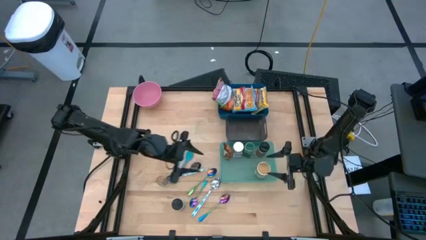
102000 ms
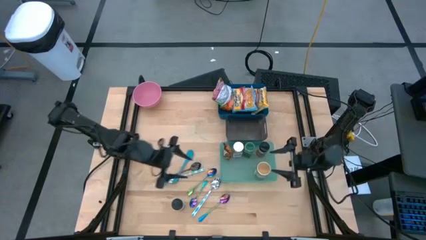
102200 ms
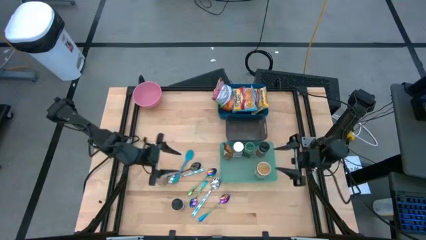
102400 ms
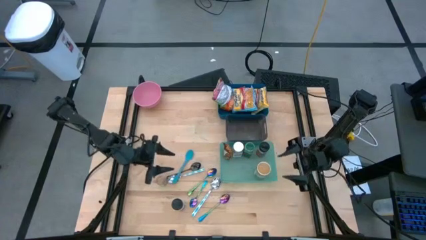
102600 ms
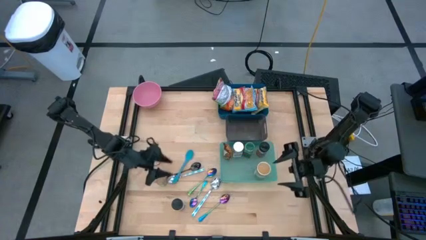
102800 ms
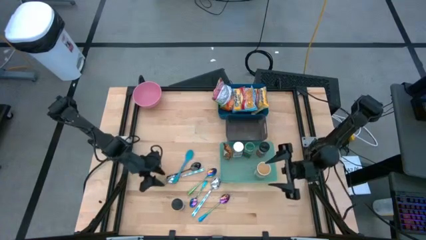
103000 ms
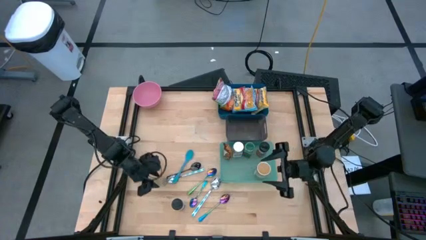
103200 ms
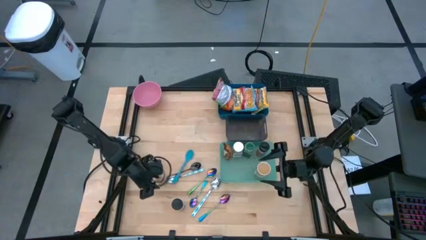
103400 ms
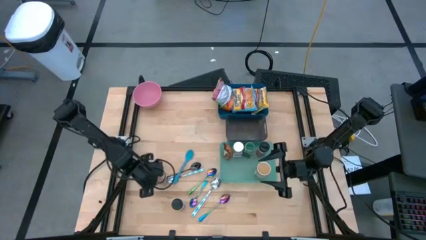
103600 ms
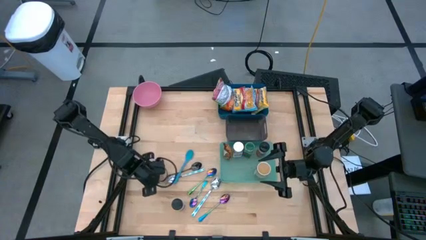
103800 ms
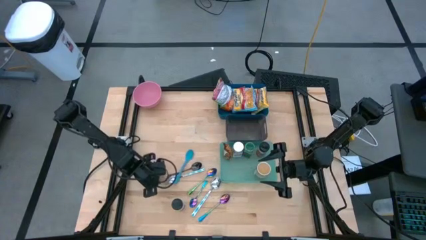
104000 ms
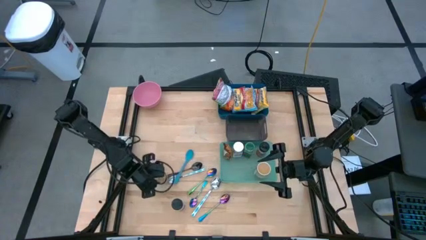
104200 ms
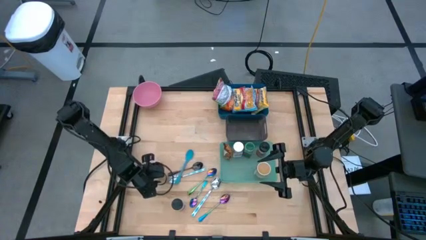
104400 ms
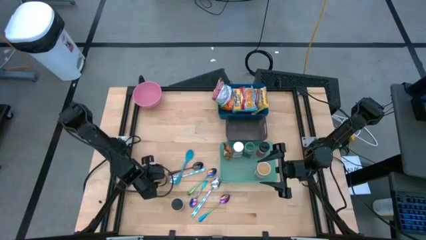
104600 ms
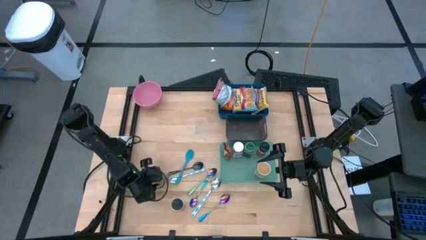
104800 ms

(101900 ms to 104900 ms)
Task: Pick & Place Food Item
Put the brown seasoning bottle into the green bin

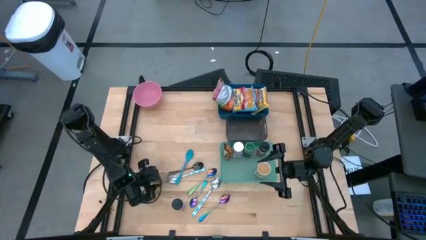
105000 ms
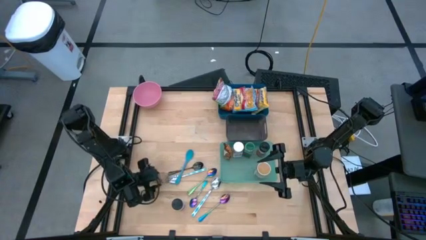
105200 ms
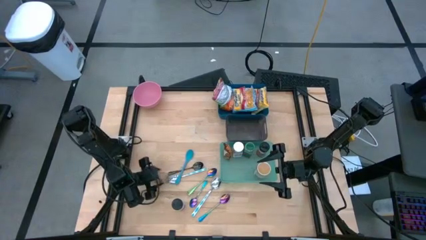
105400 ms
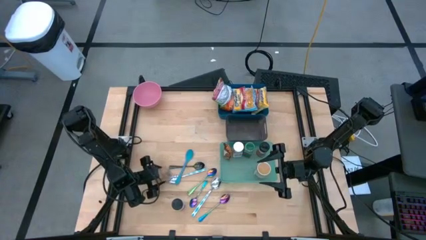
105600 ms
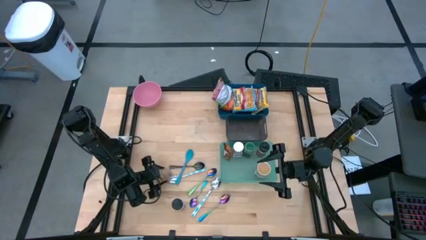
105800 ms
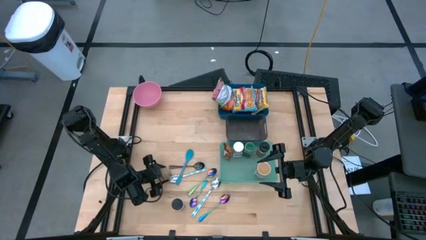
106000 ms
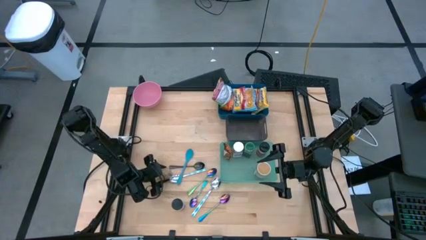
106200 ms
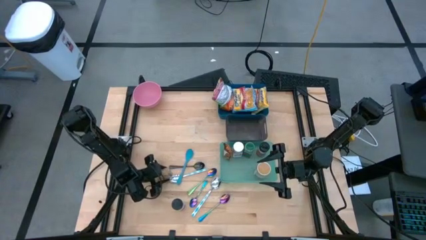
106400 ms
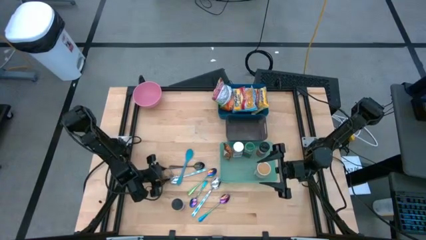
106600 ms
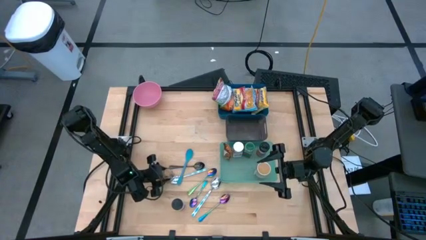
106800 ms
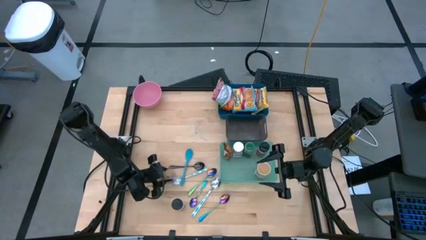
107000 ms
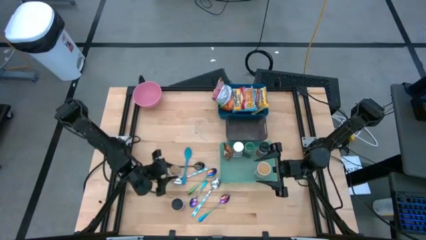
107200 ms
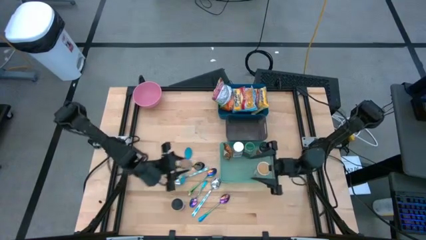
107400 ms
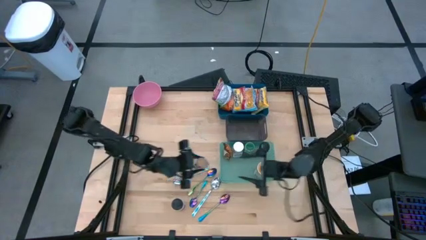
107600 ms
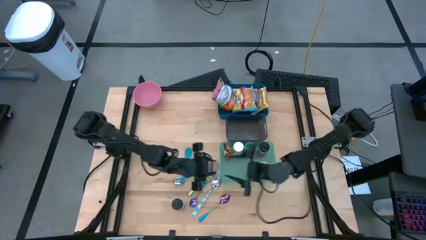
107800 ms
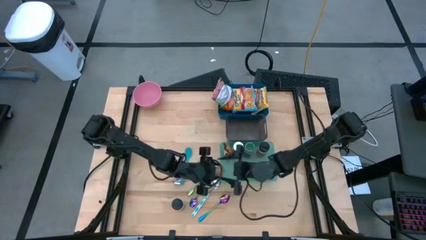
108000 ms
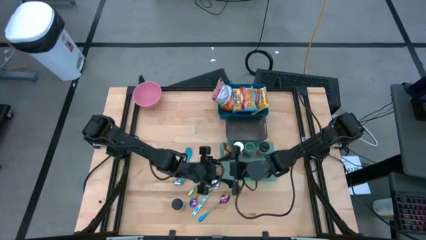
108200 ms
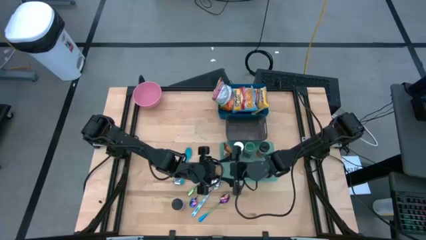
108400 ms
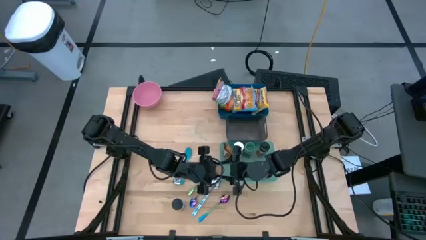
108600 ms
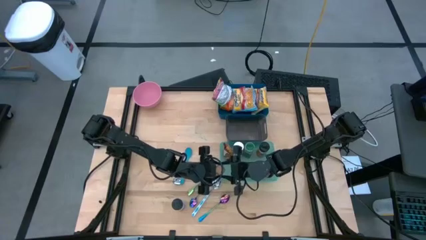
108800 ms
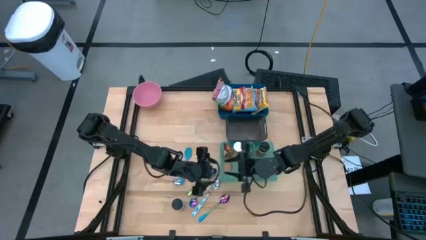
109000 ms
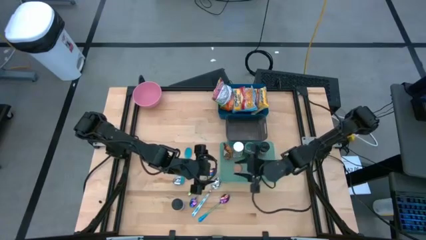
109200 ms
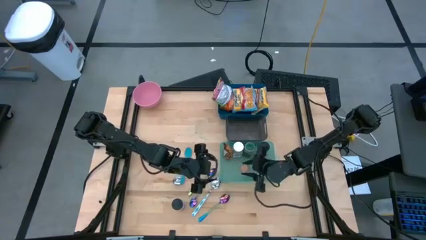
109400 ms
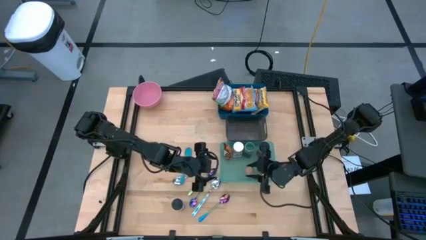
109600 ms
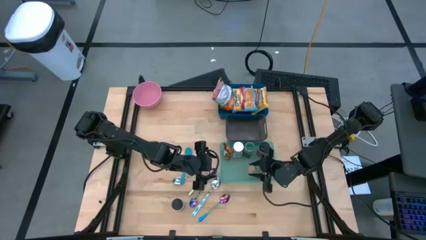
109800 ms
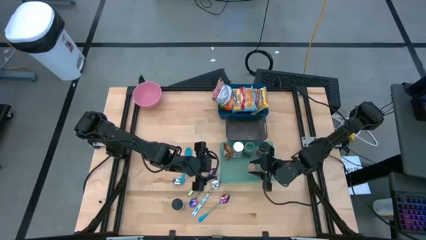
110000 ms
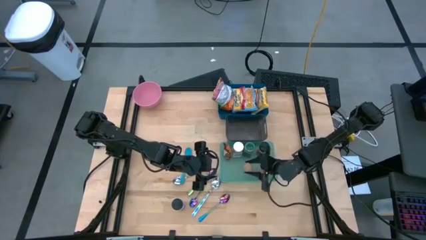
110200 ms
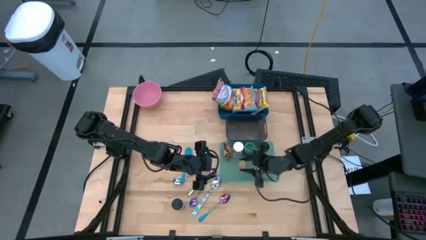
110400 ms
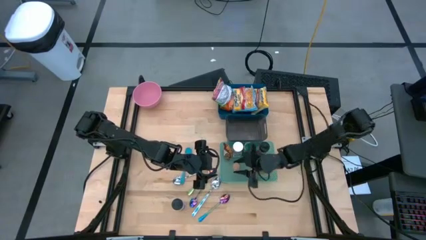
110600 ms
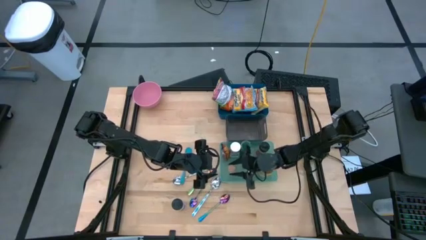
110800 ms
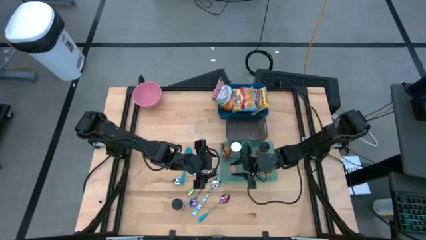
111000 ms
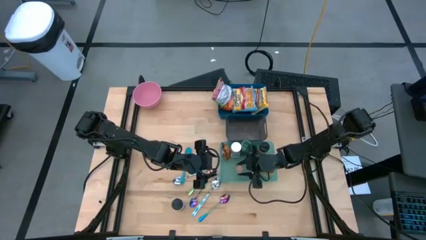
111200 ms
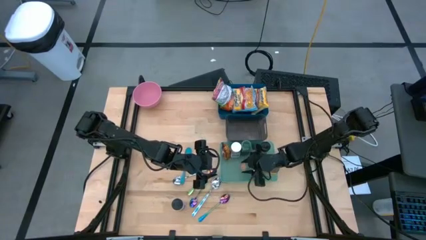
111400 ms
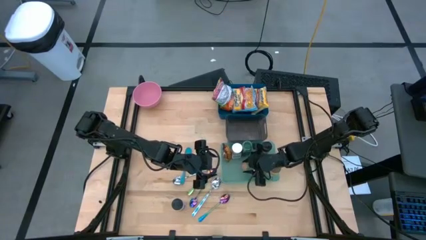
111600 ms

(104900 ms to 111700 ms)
Put the brown seasoning bottle into the green bin

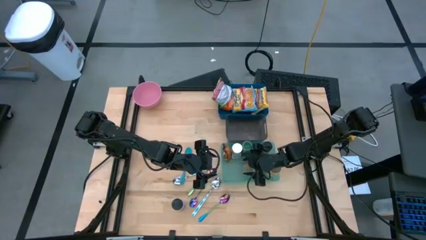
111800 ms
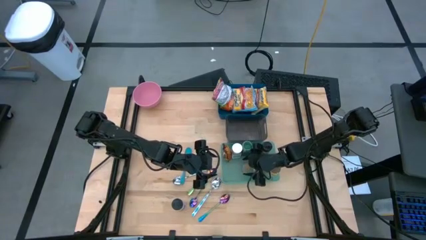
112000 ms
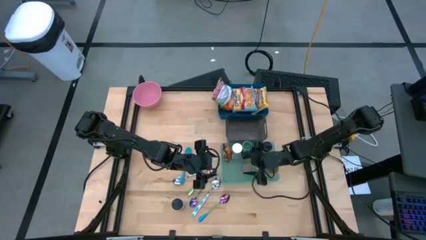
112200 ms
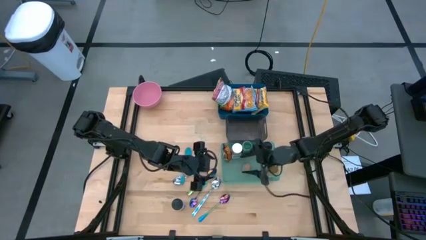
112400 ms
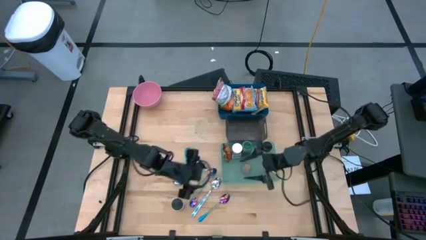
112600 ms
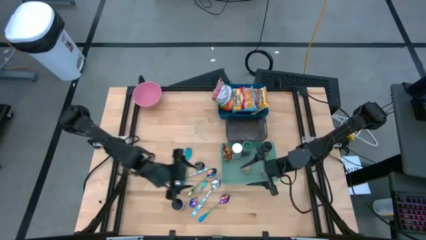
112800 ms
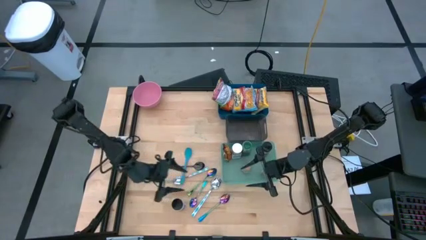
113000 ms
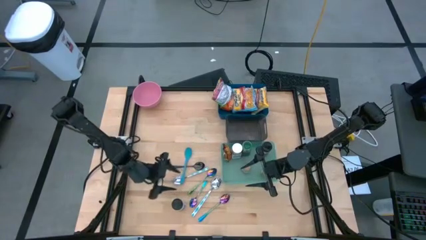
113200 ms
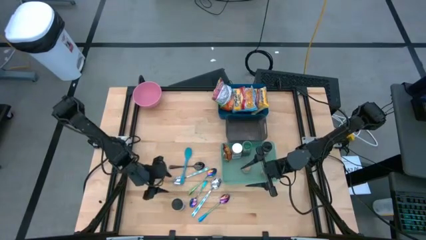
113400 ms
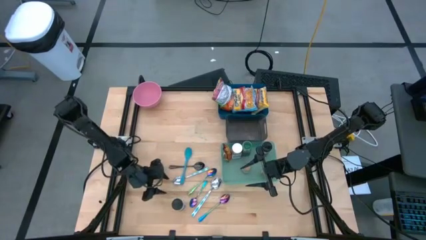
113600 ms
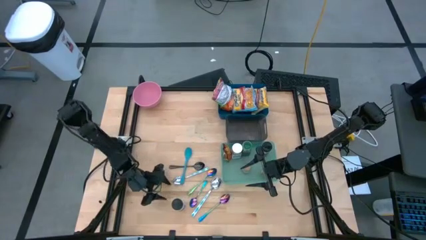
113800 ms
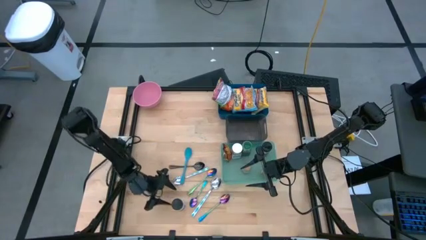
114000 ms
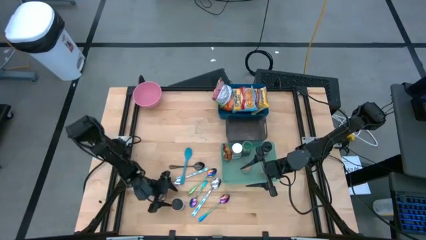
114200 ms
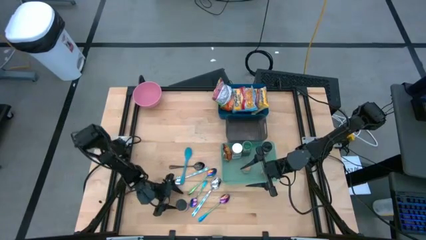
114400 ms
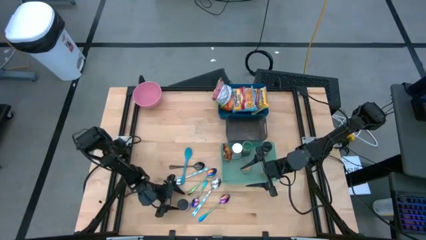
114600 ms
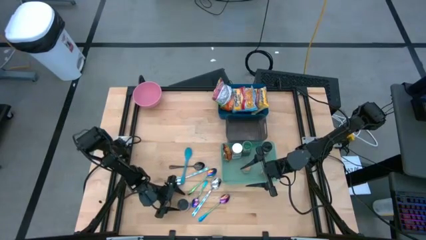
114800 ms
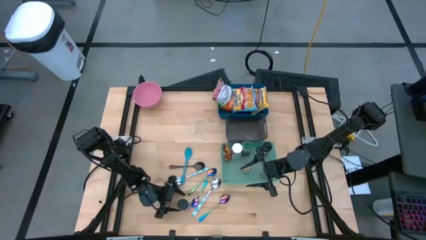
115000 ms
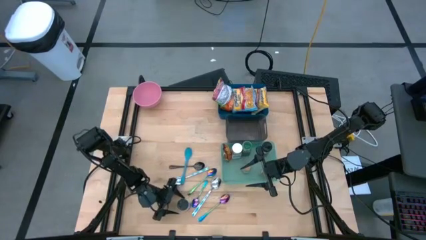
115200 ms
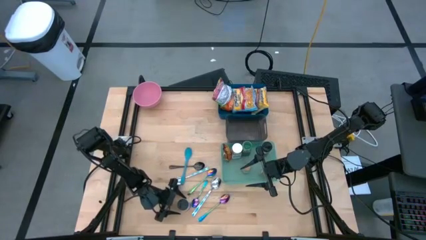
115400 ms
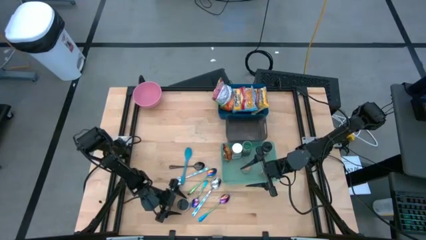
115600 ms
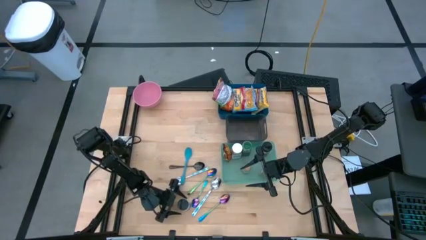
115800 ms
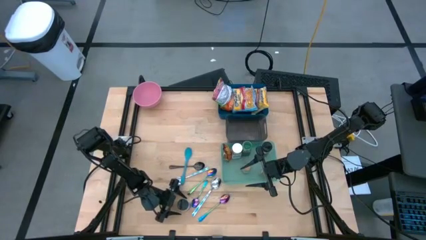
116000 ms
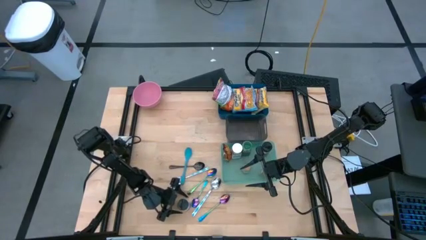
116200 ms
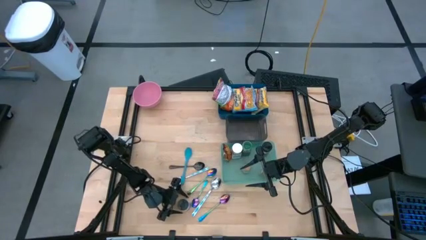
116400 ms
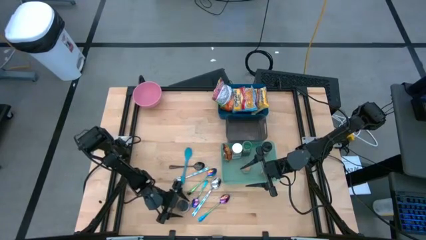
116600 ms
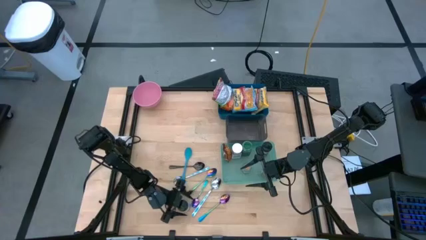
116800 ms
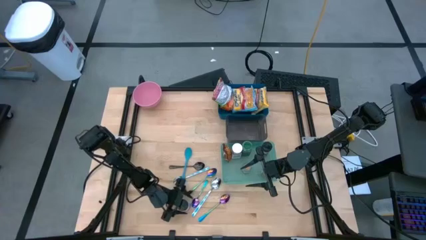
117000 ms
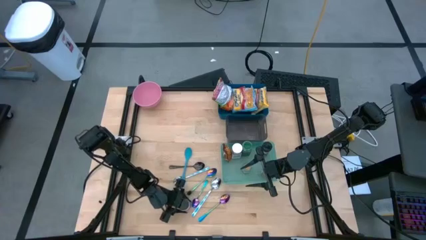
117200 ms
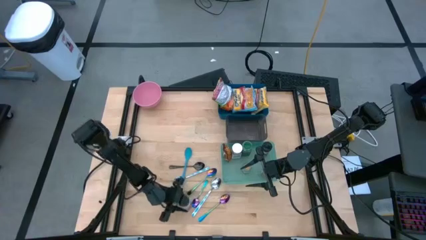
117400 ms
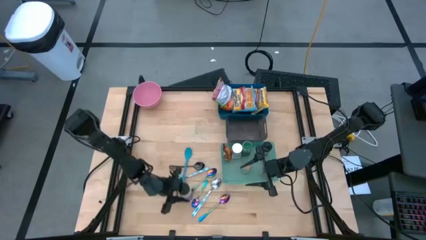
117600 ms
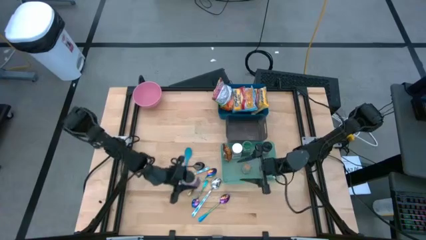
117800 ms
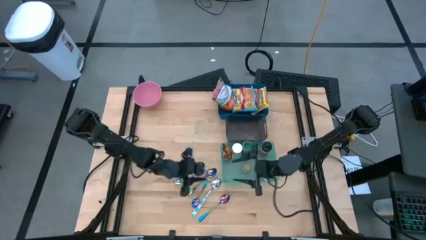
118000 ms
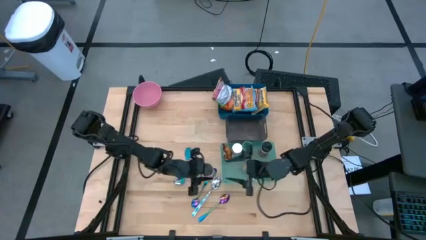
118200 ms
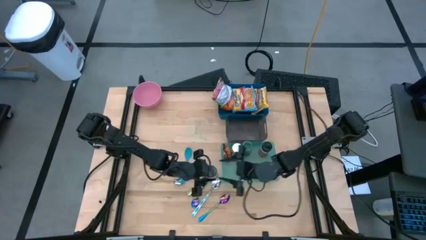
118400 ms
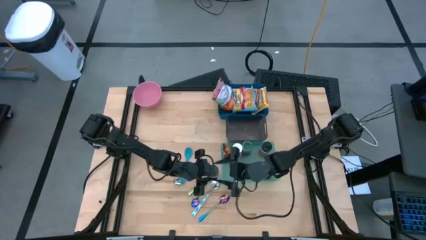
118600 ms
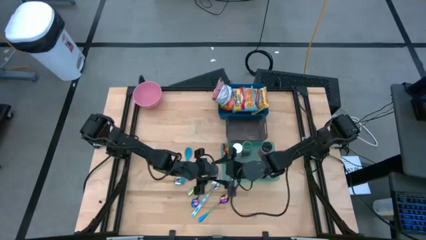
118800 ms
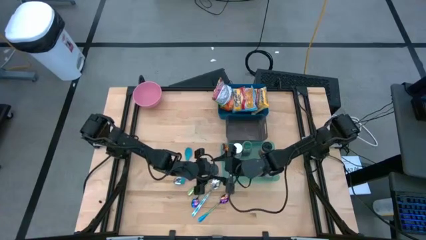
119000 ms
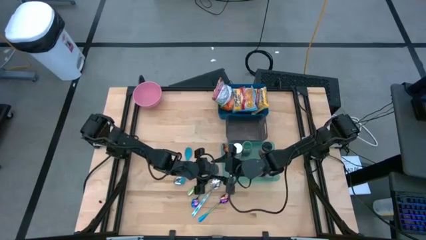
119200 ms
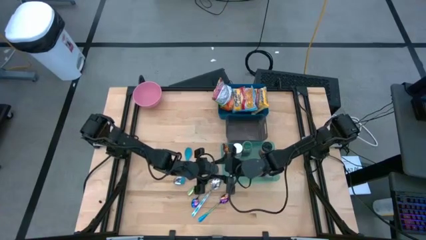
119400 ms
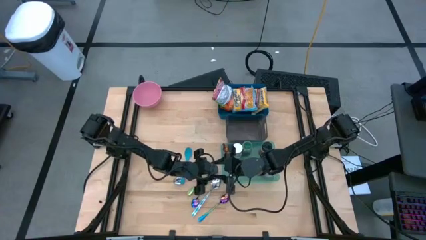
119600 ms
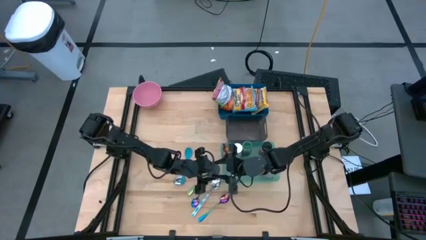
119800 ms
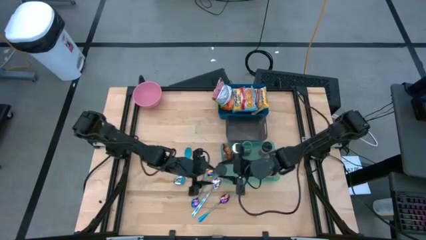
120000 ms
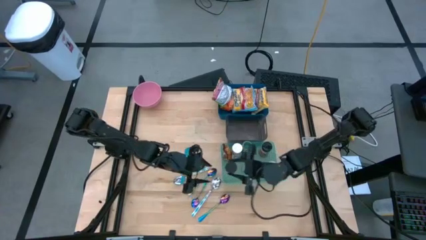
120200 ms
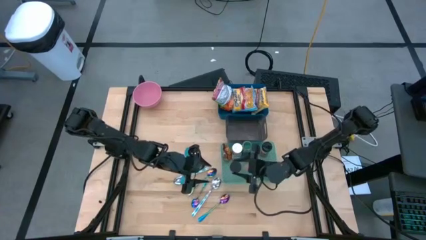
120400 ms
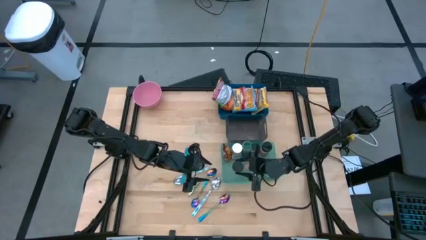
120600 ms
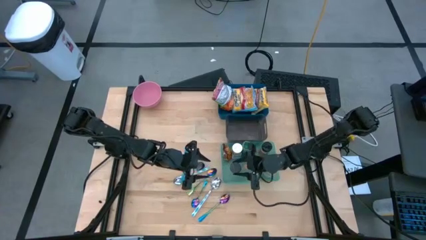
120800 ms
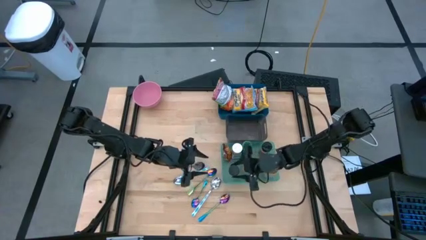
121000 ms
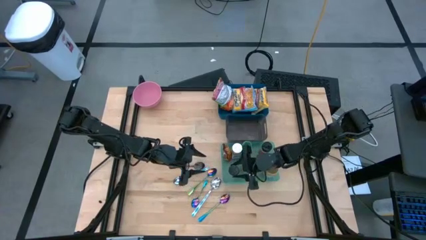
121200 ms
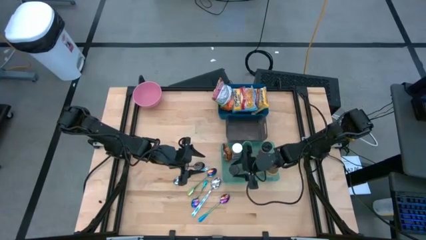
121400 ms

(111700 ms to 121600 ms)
Put the purple seasoning bottle into the green bin
